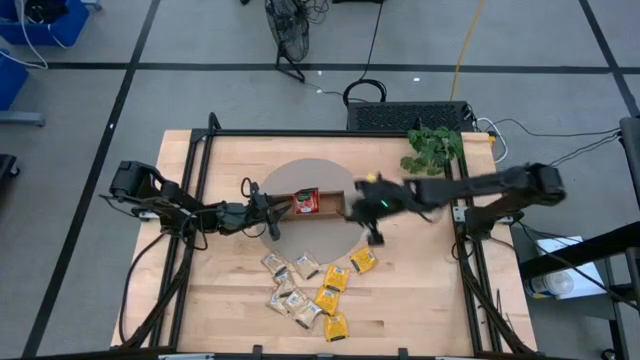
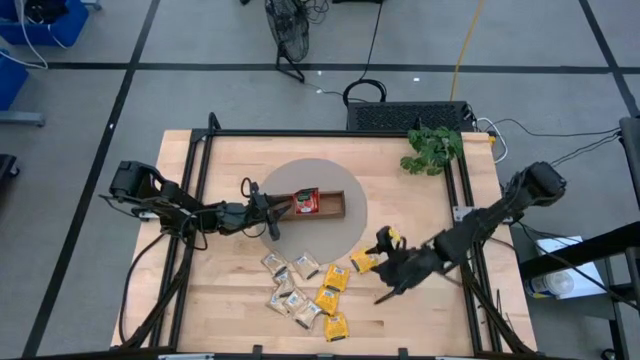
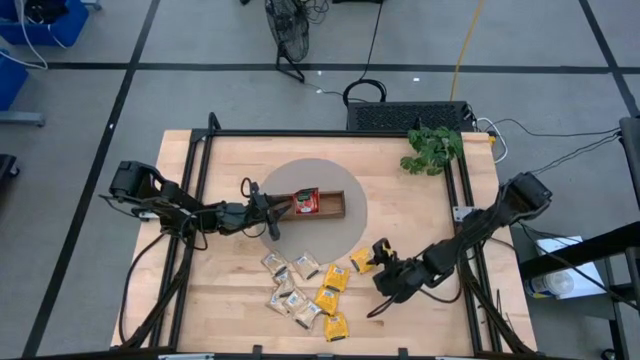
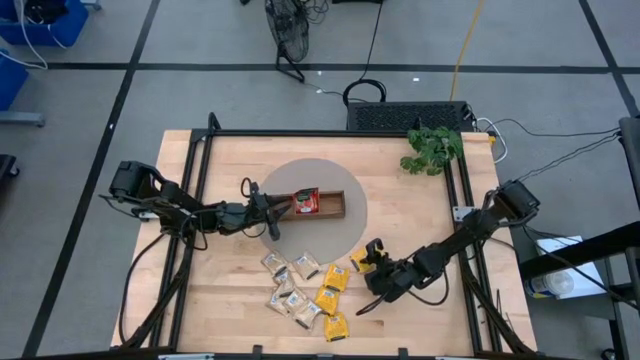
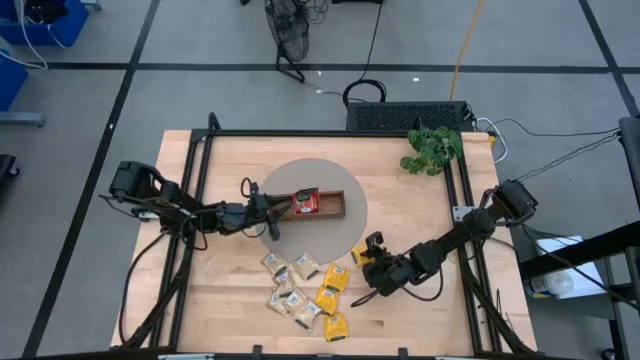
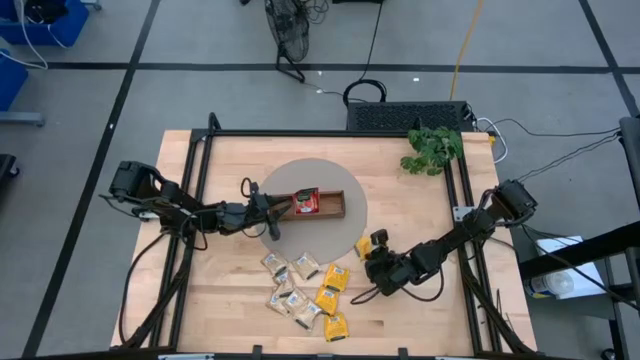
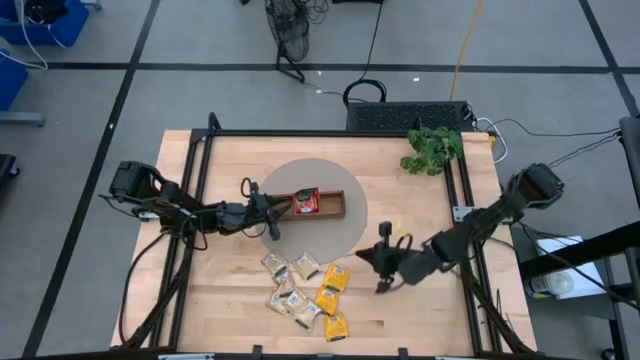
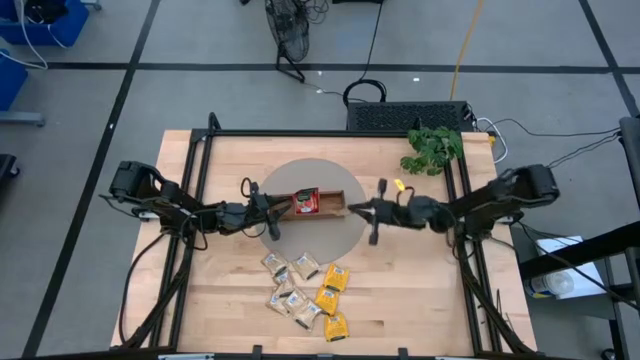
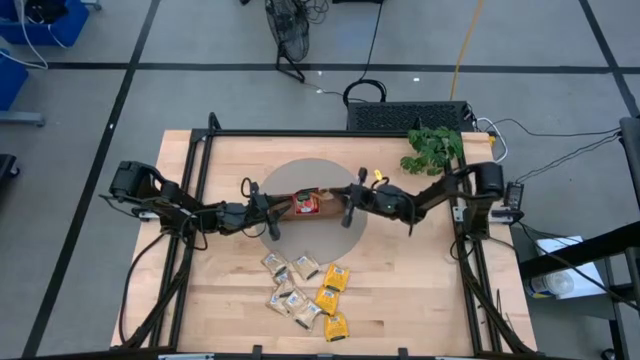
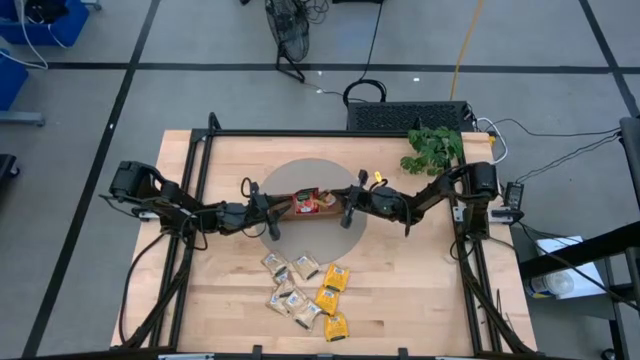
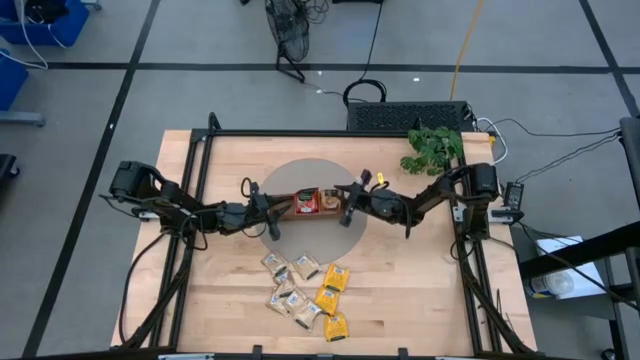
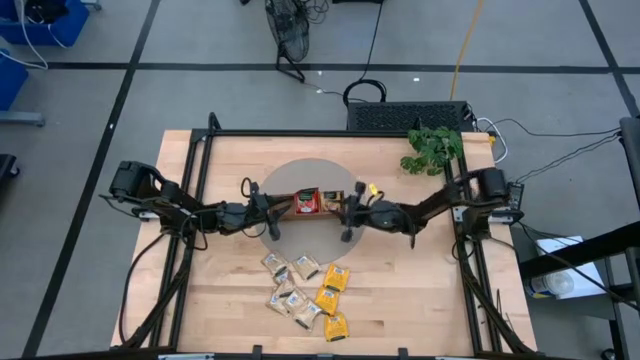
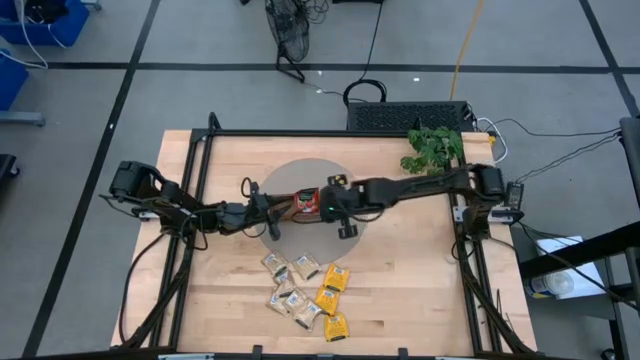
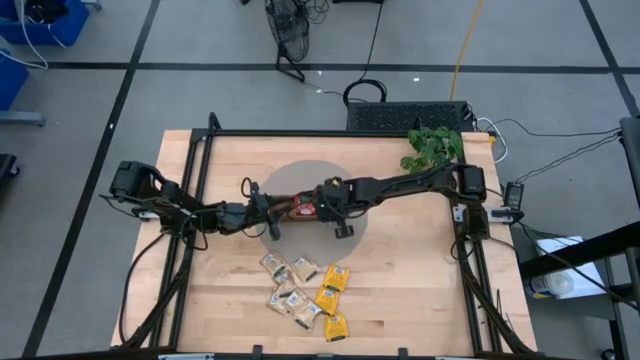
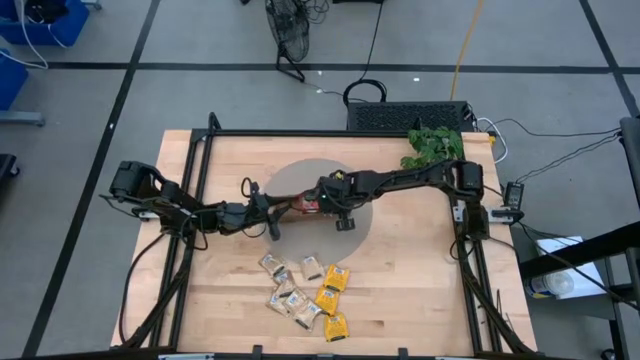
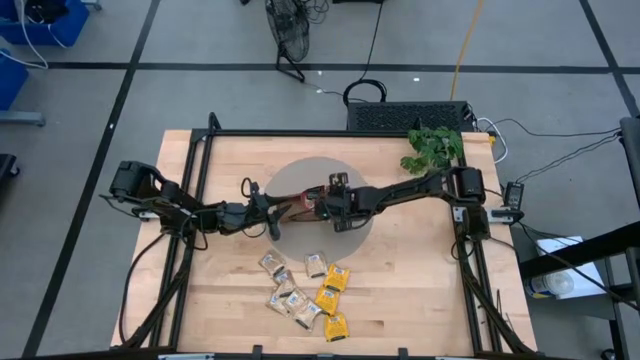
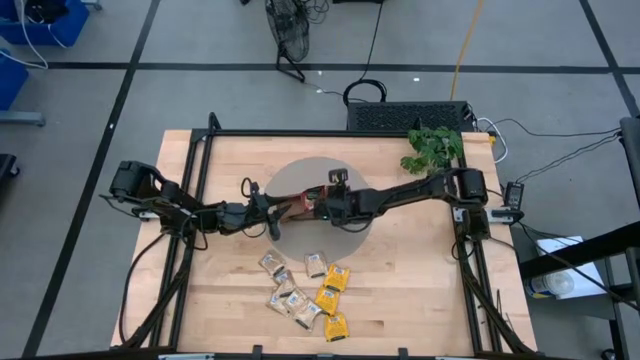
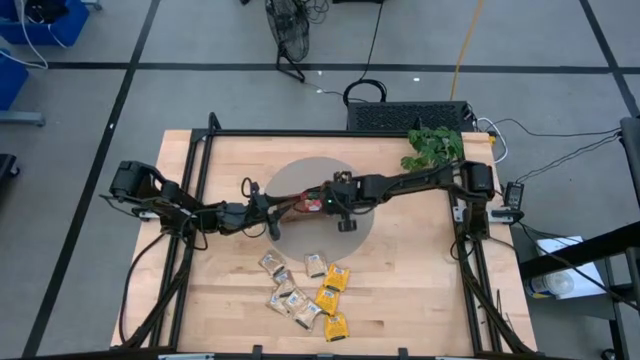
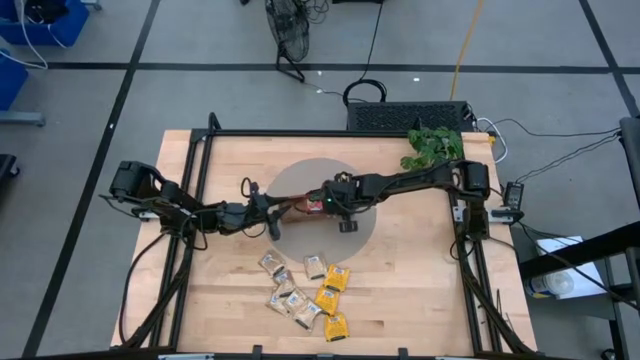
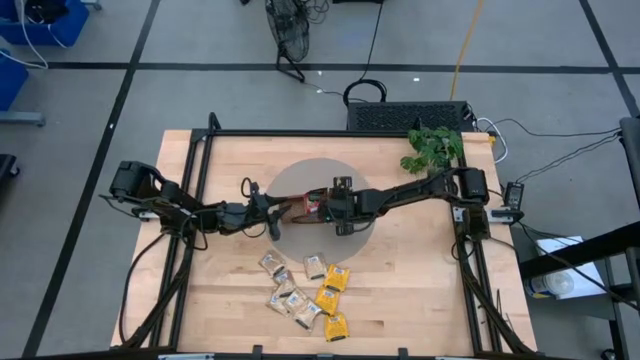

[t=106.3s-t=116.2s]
Task: Pick & Place Tea
Put the yellow tea bag into the wooden organizer

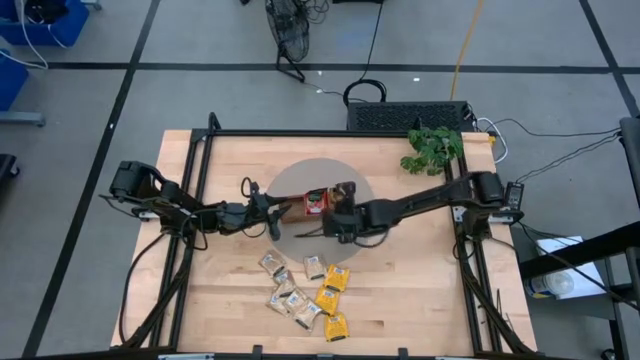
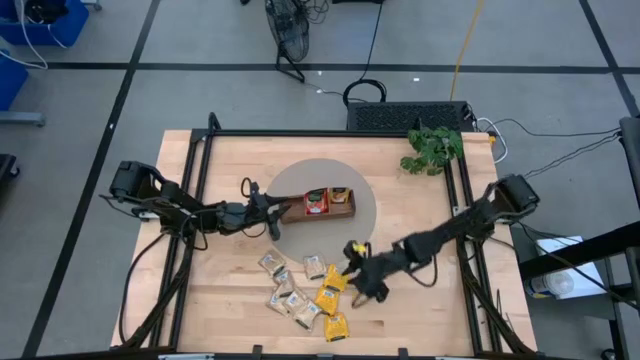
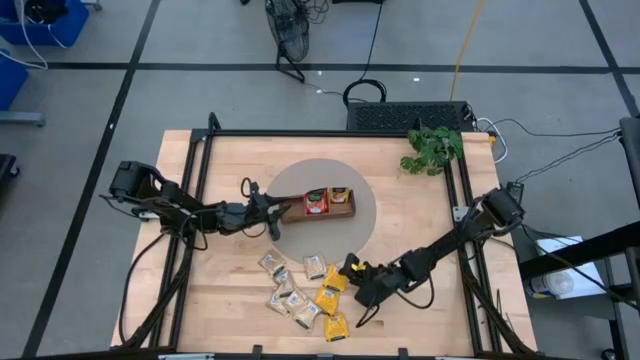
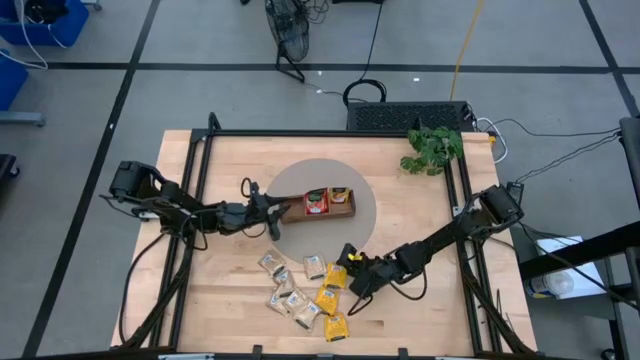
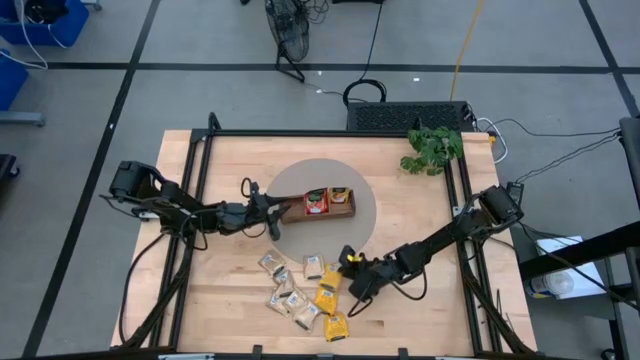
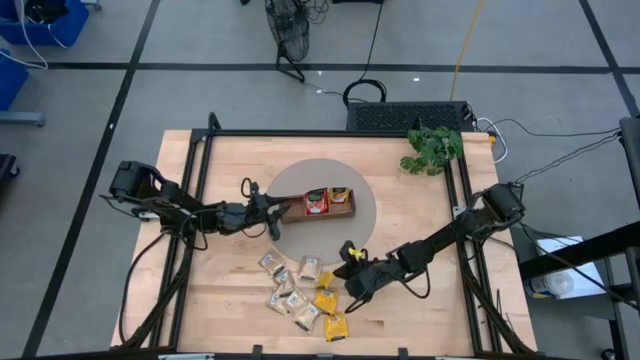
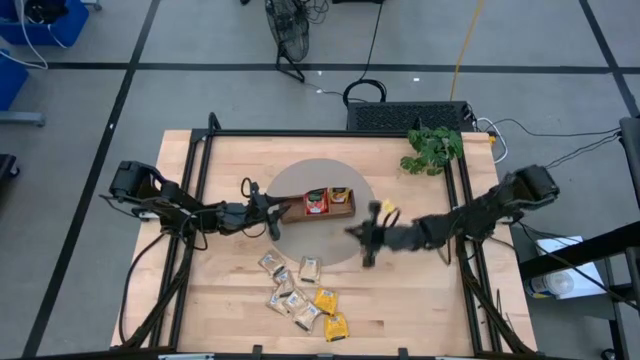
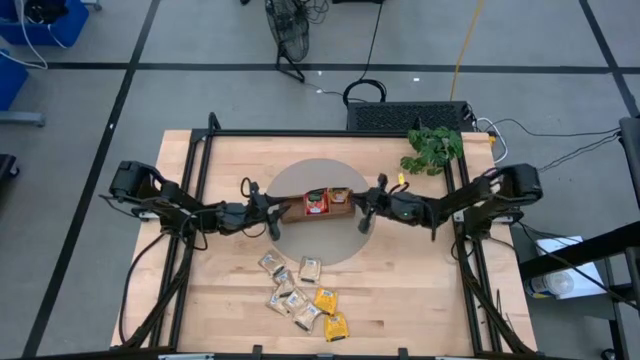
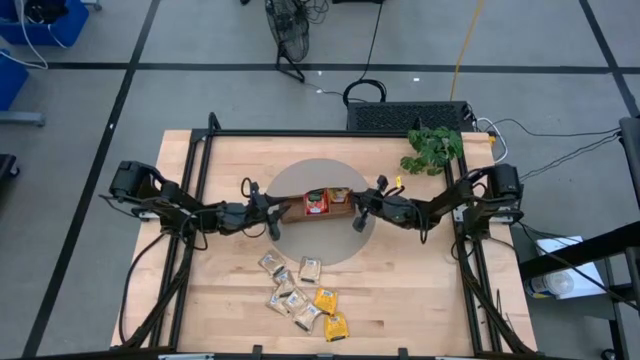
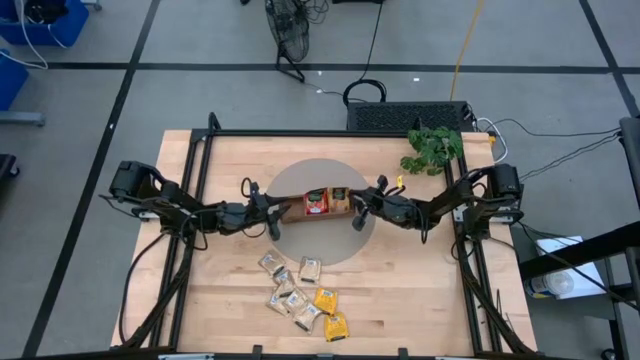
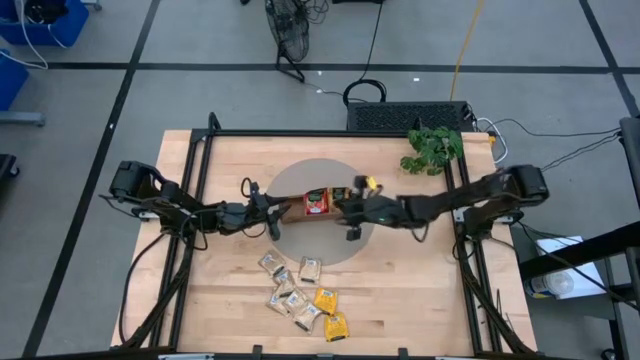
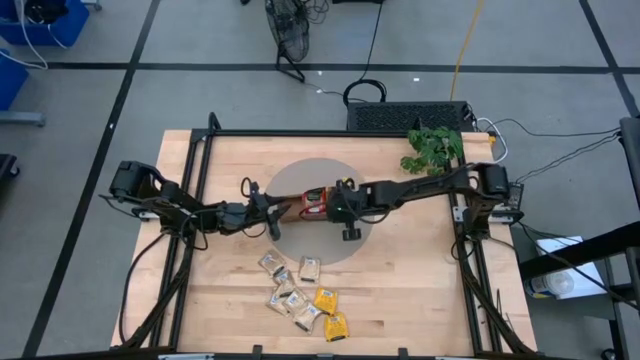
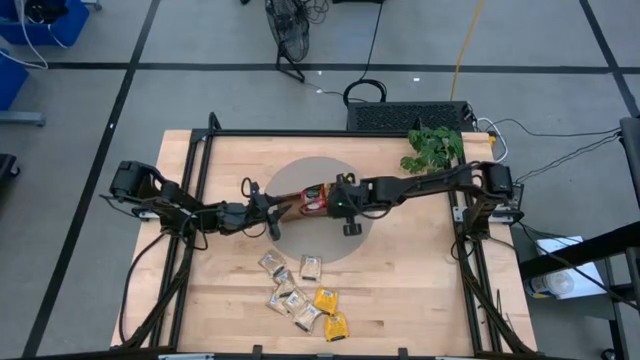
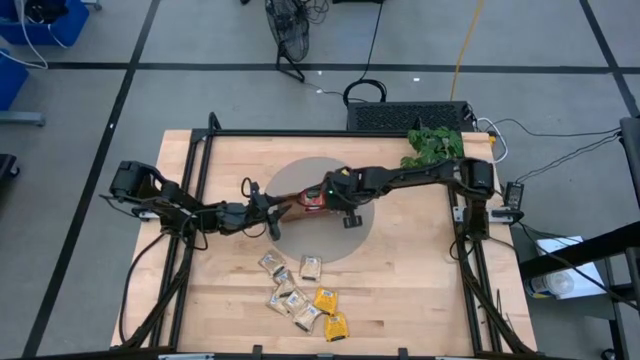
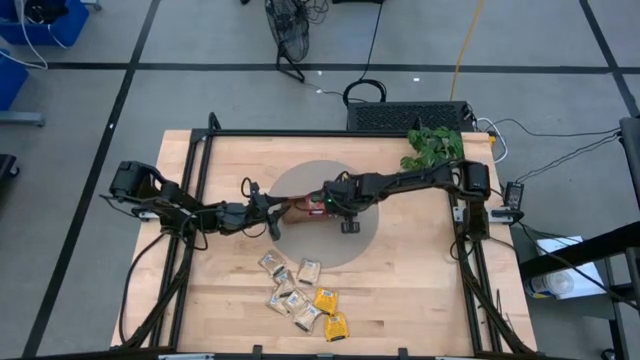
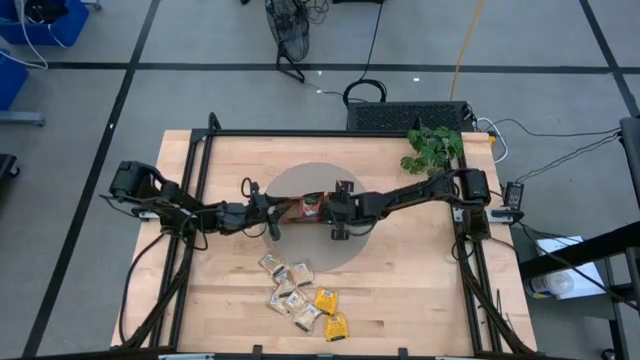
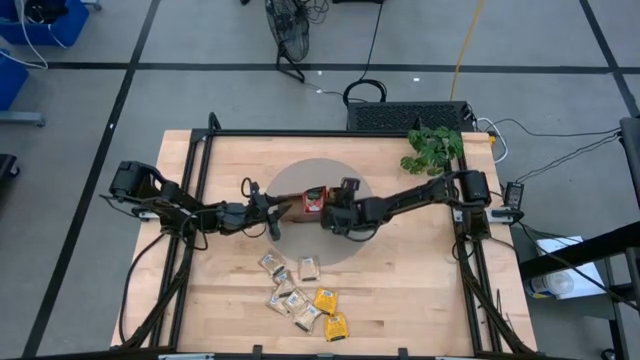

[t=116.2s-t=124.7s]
Put the yellow tea bag into the wooden organizer

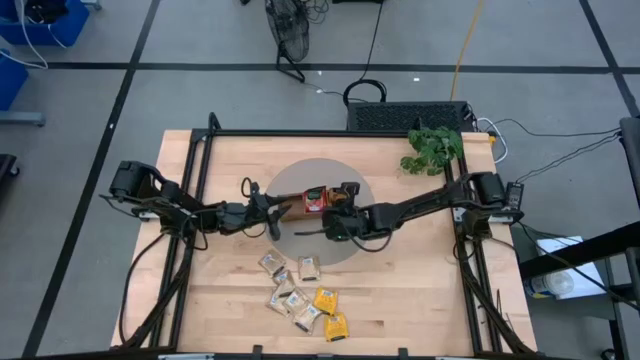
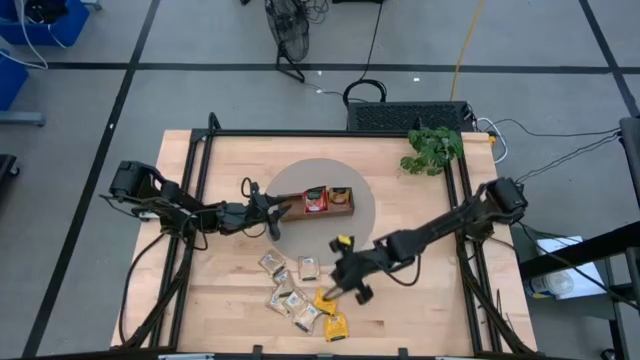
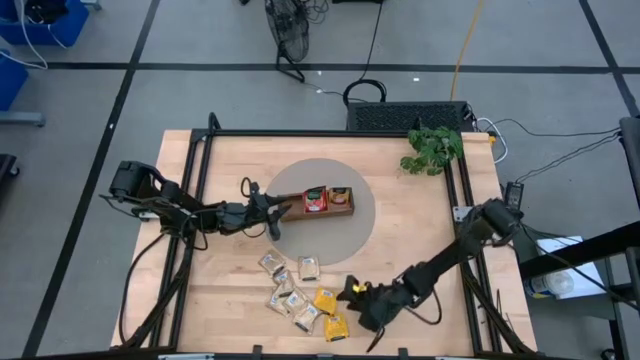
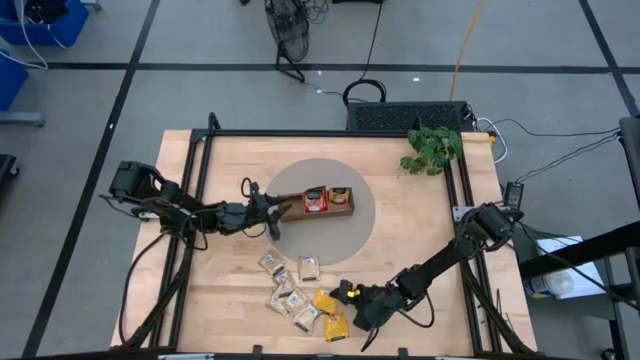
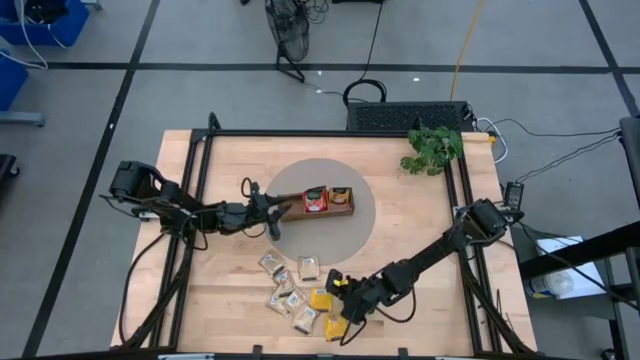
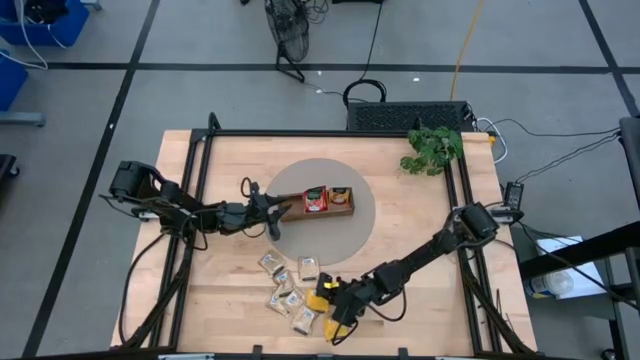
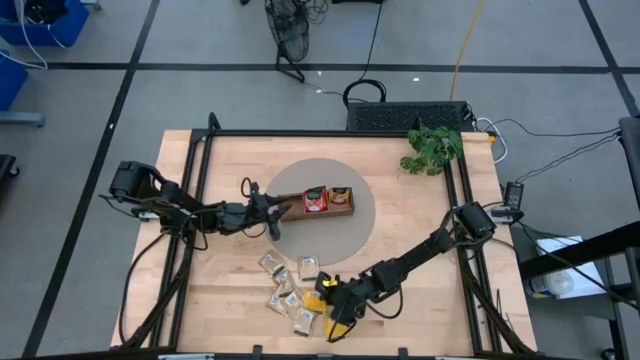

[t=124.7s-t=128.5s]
Put the yellow tea bag into the wooden organizer
